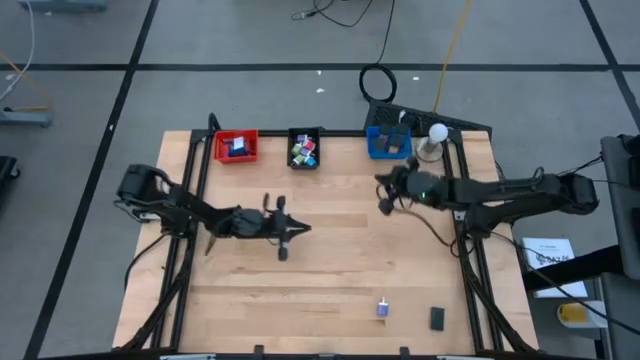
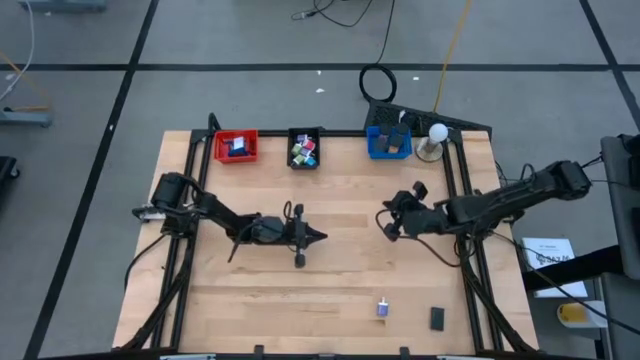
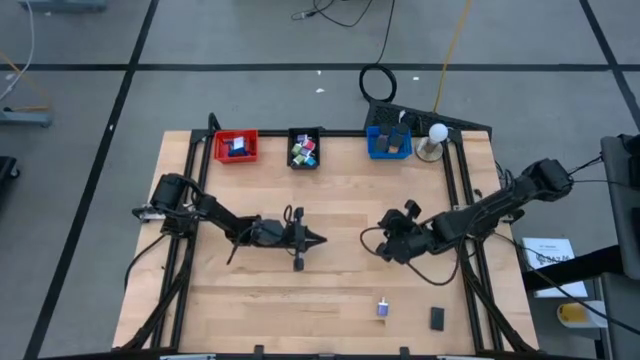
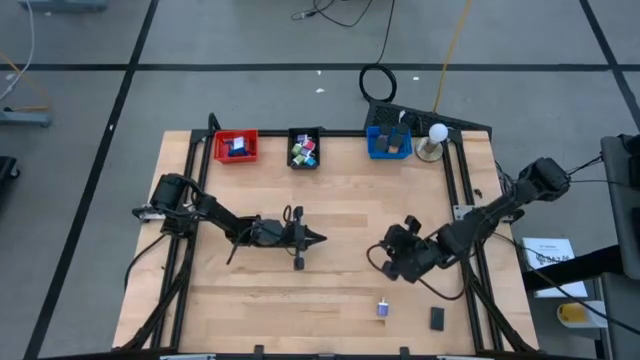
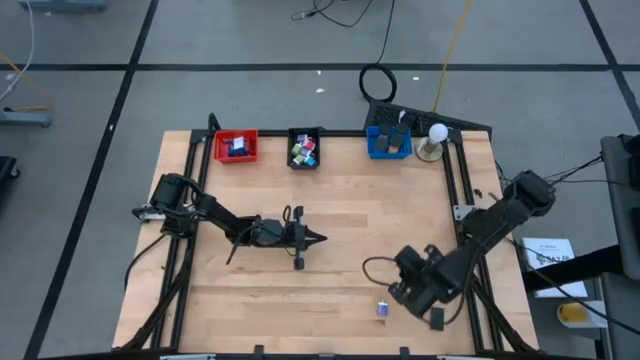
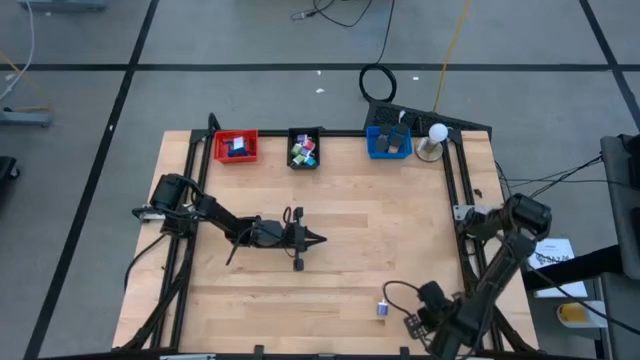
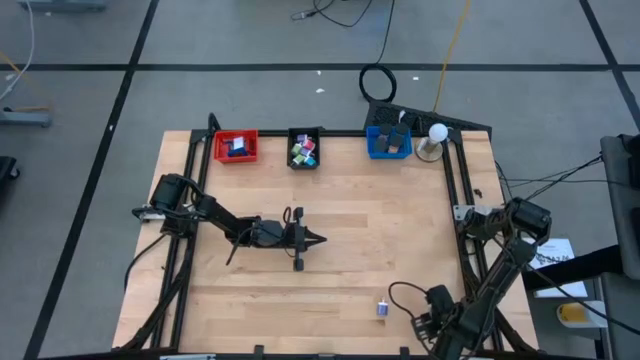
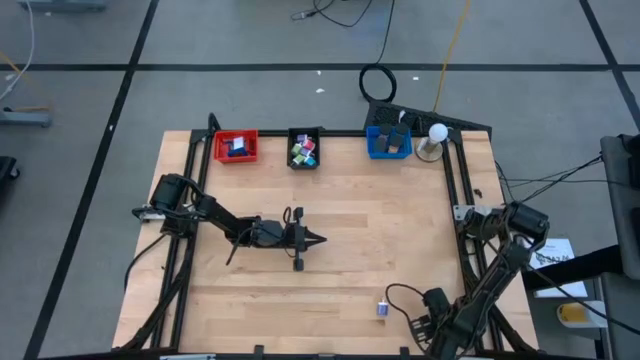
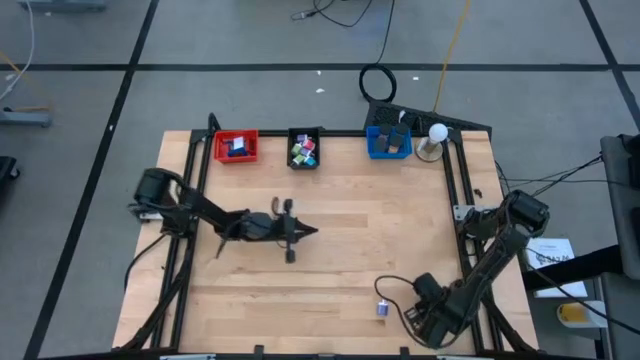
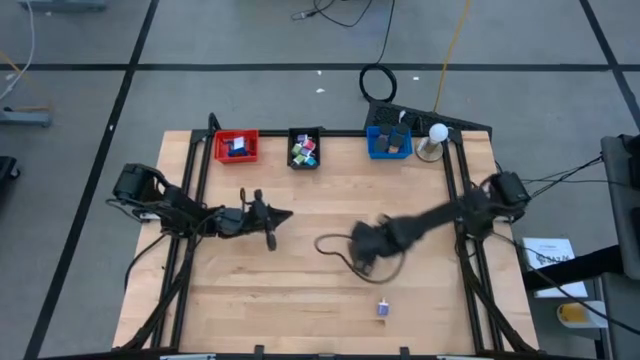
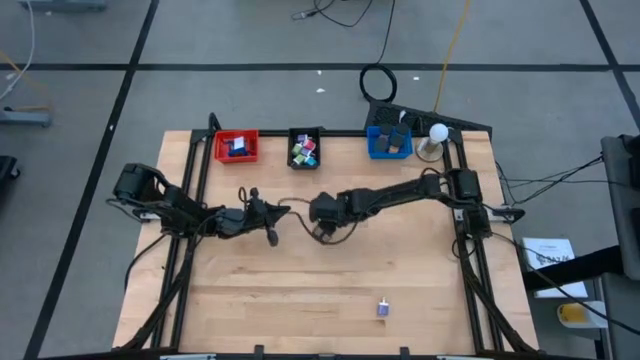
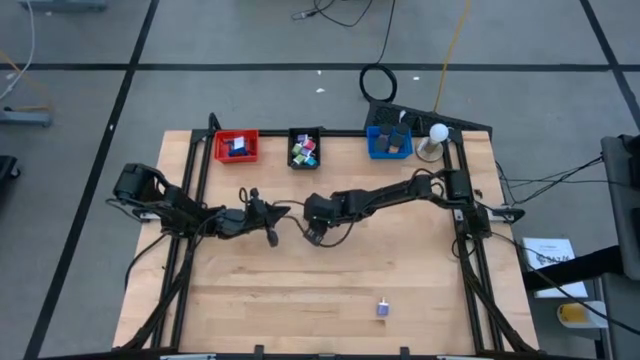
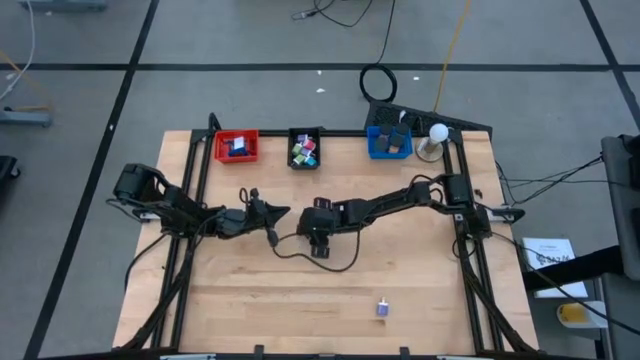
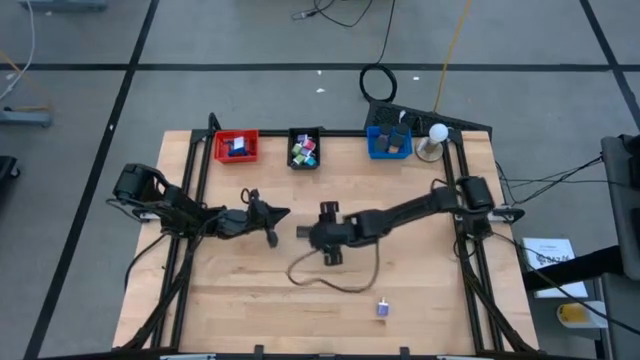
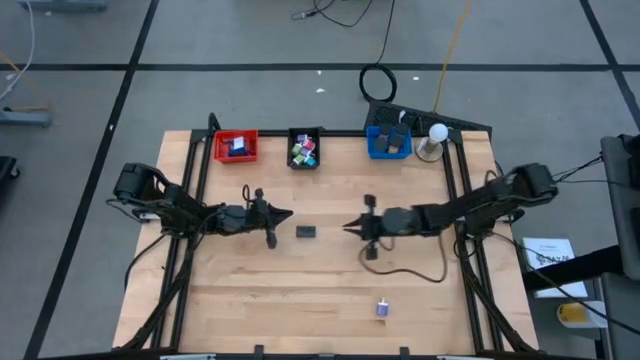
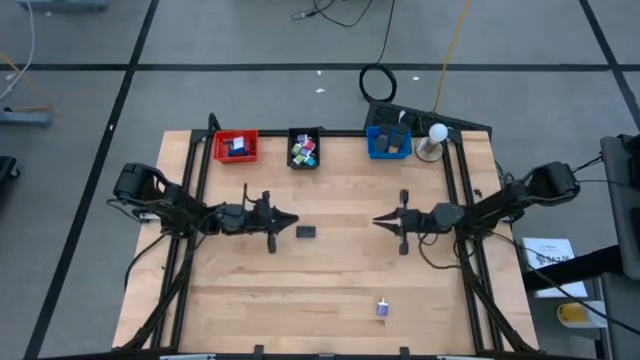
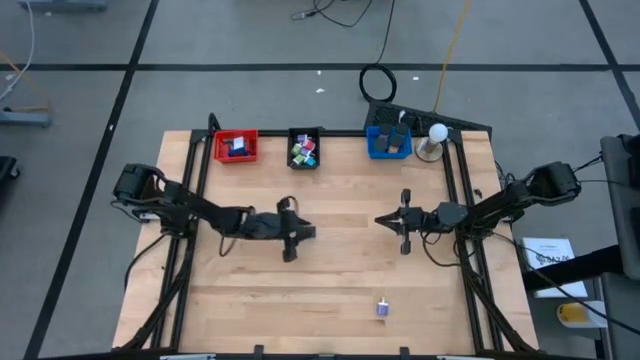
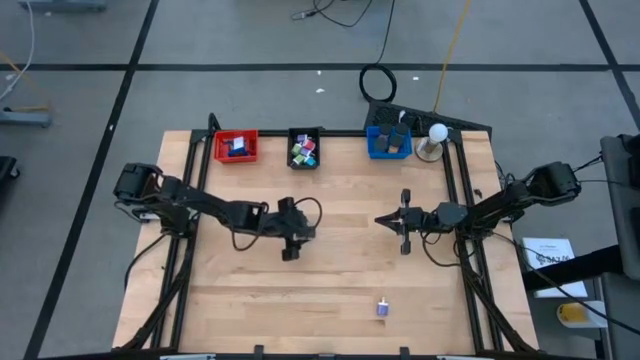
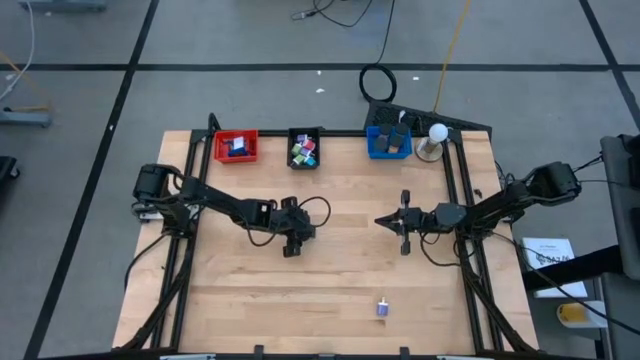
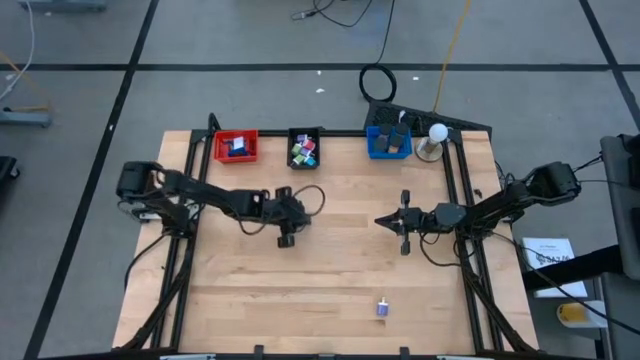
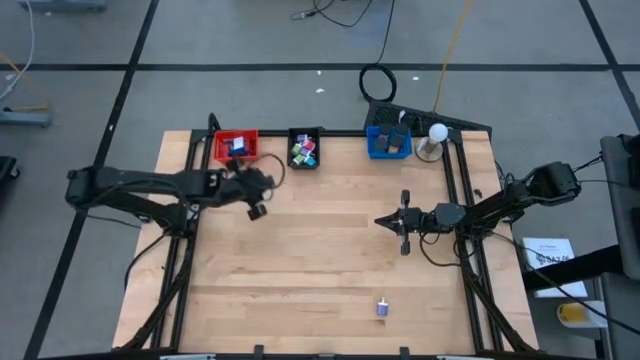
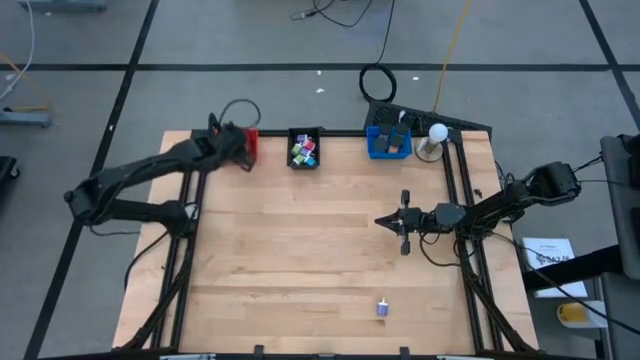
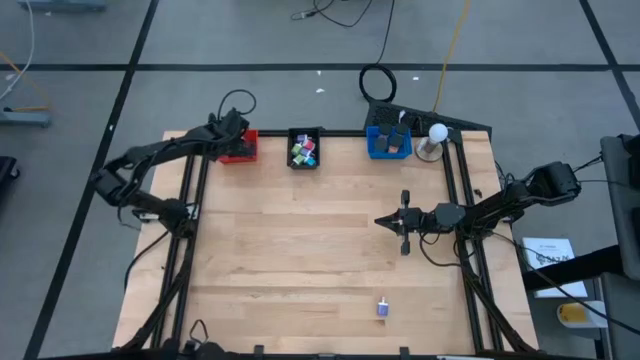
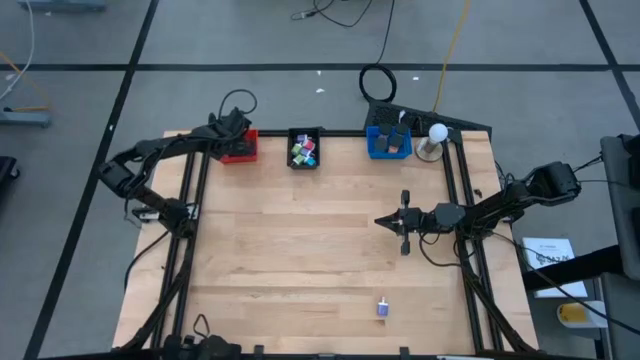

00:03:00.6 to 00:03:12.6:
Task: Pick & Place Office items
Put the black digital clock into the red bin

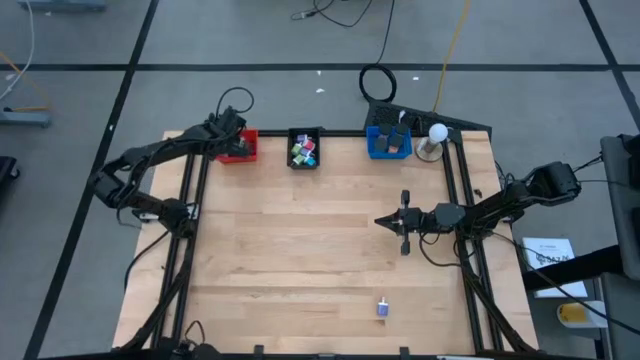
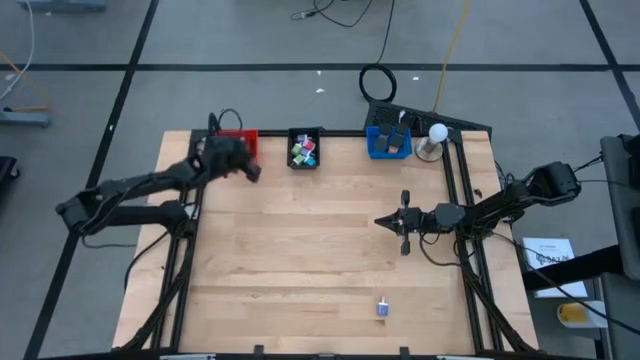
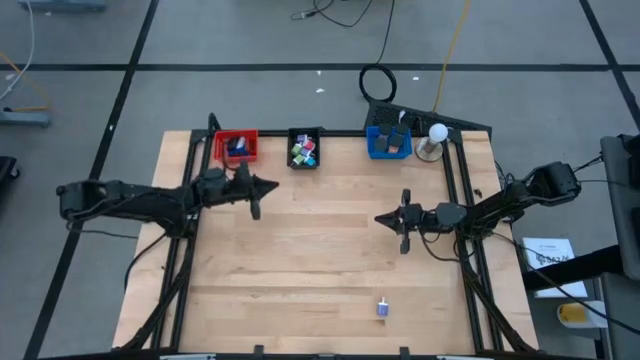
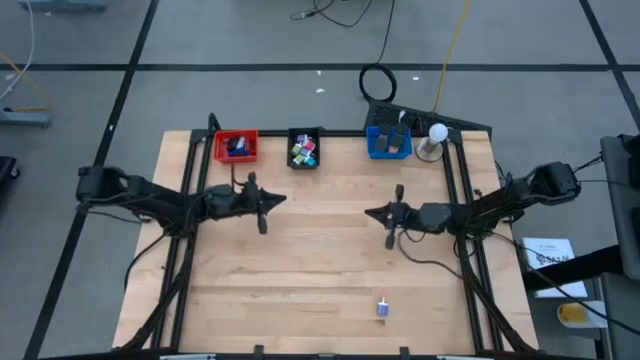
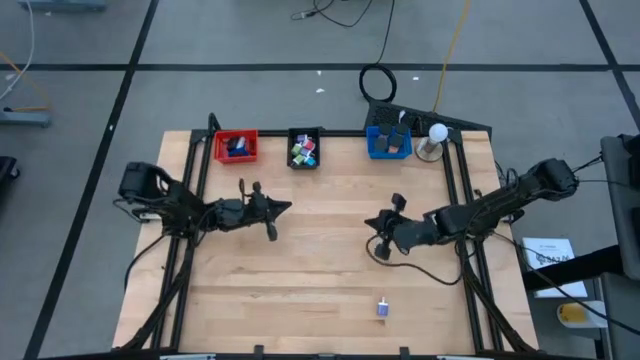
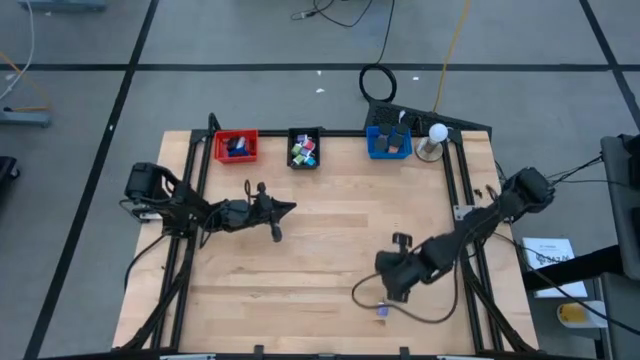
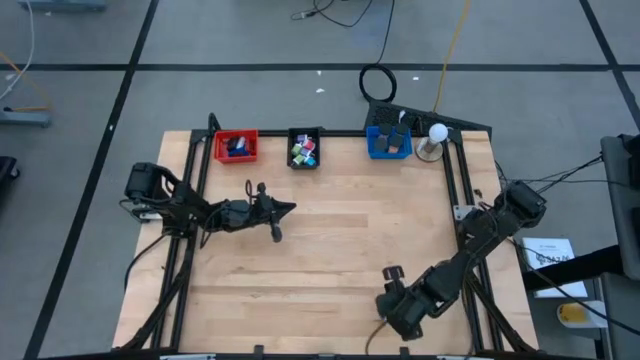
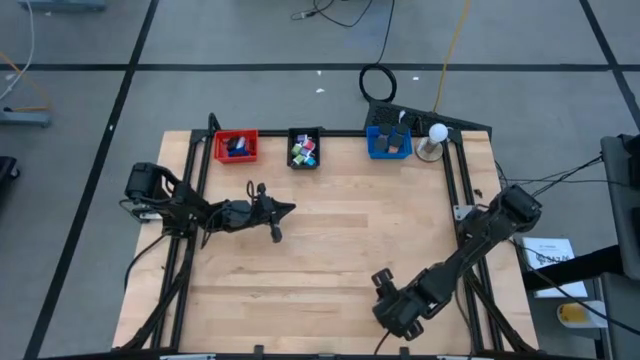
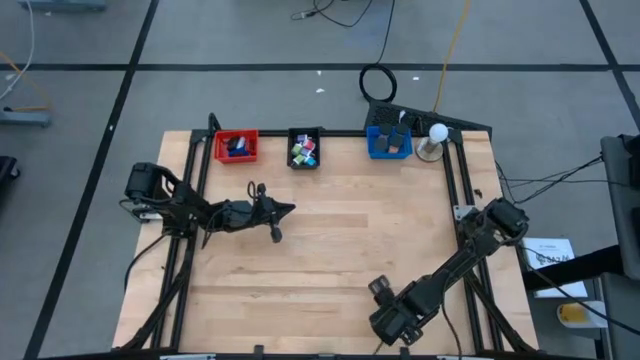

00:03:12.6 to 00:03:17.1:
Put the blue charger adapter head into the black bin

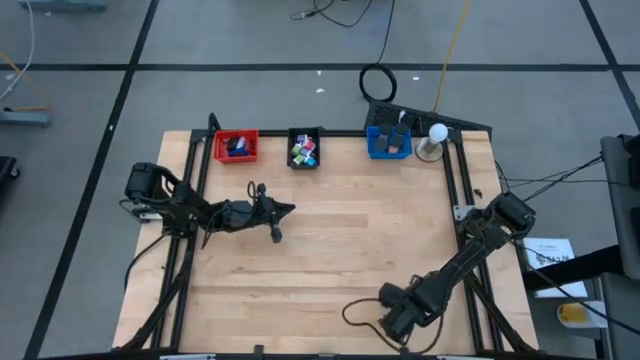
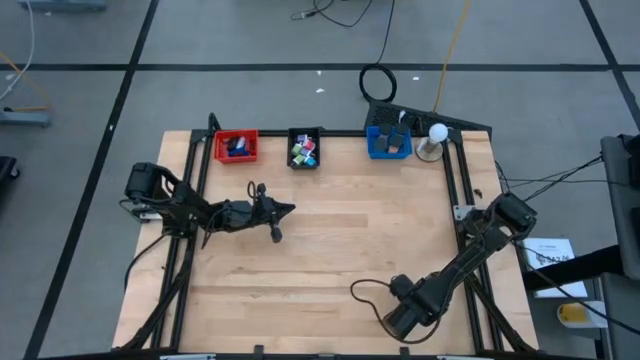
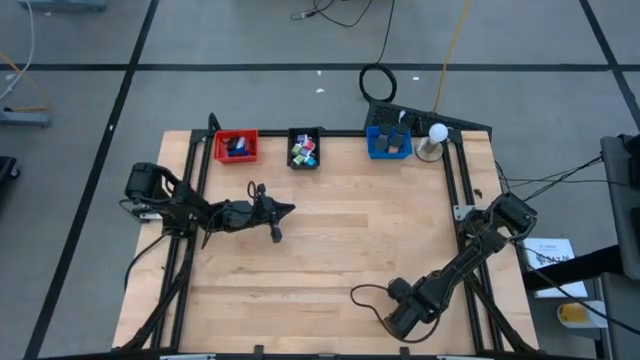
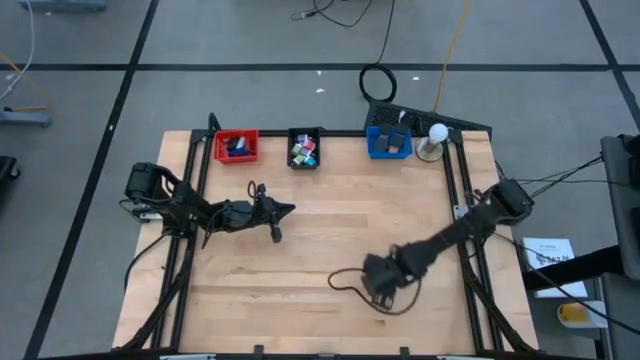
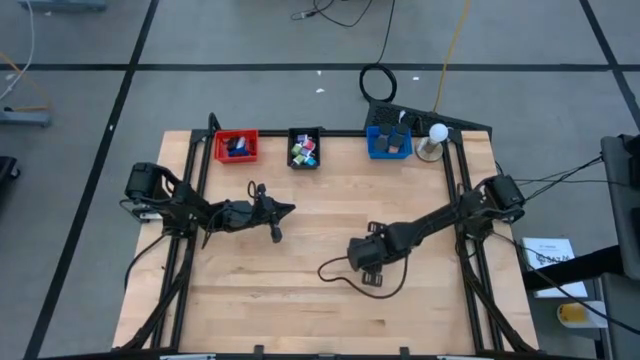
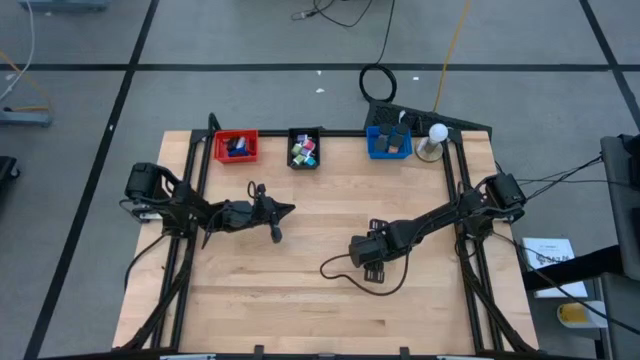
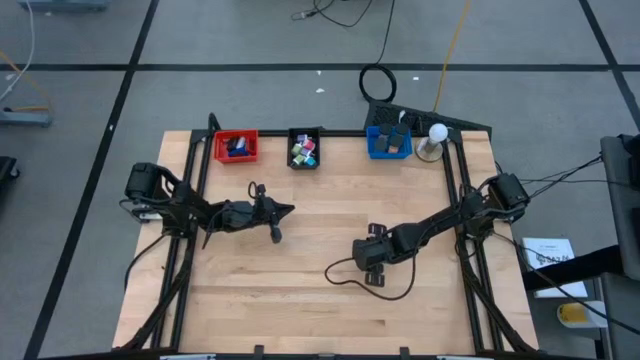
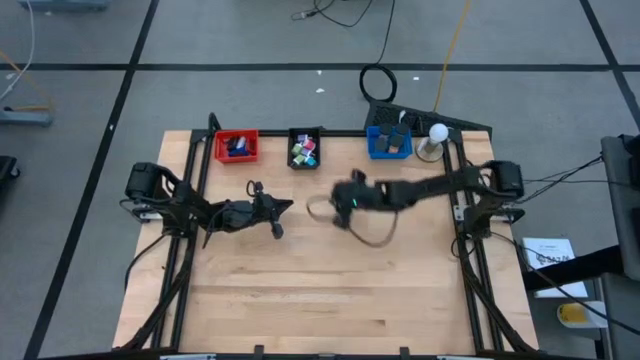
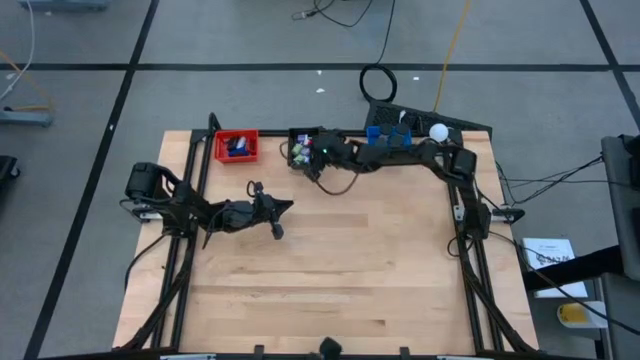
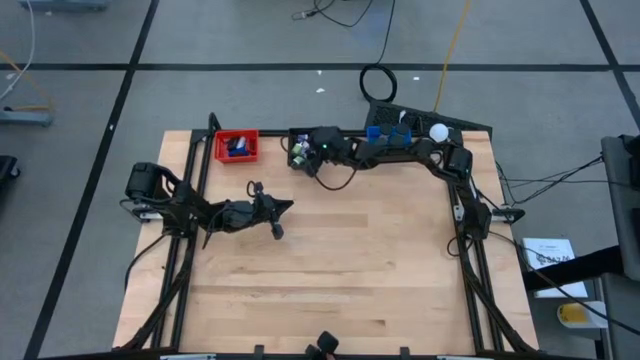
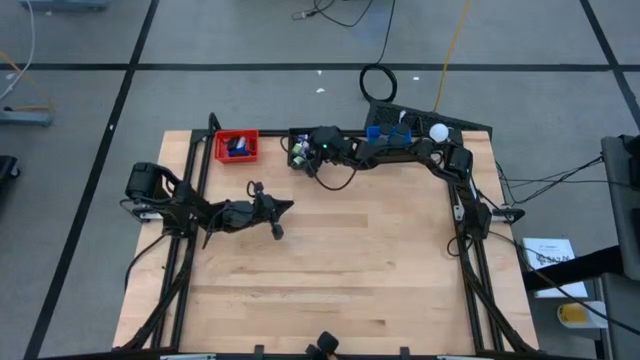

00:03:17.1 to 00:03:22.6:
Put the blue charger adapter head into the black bin
